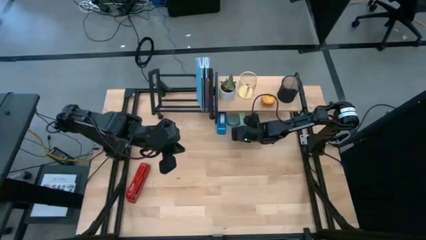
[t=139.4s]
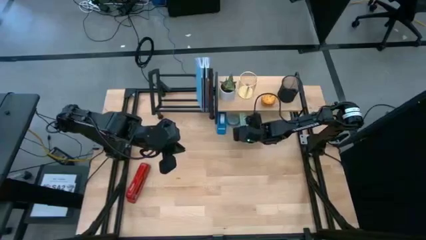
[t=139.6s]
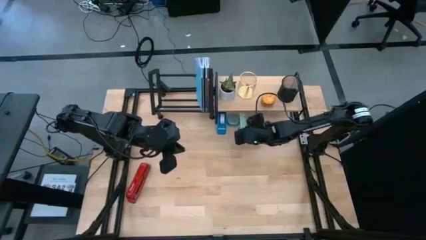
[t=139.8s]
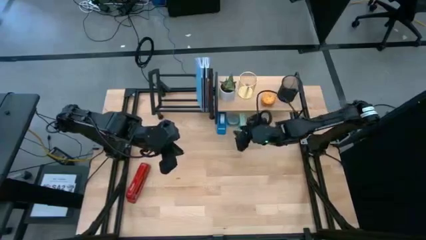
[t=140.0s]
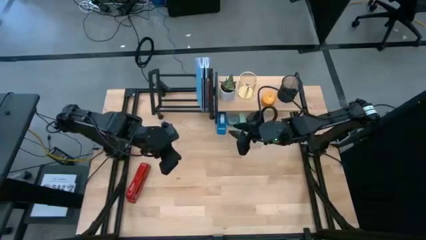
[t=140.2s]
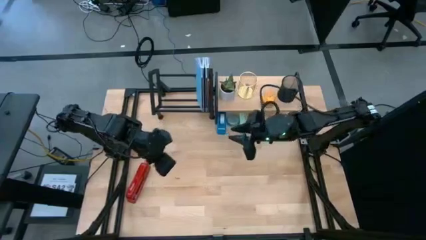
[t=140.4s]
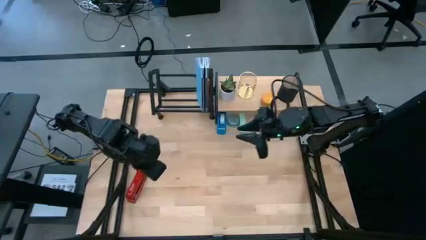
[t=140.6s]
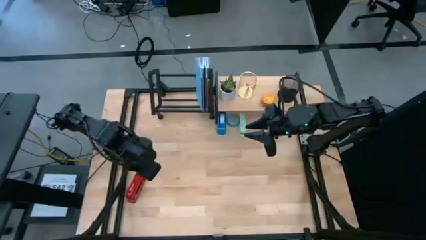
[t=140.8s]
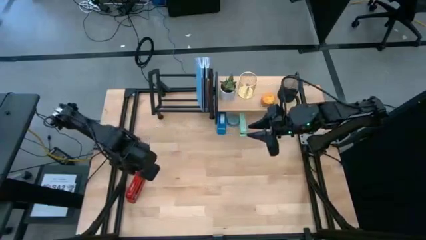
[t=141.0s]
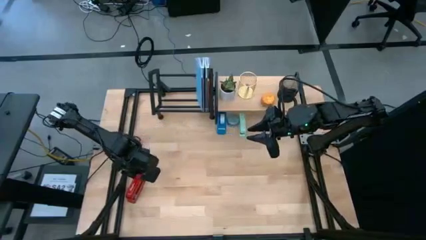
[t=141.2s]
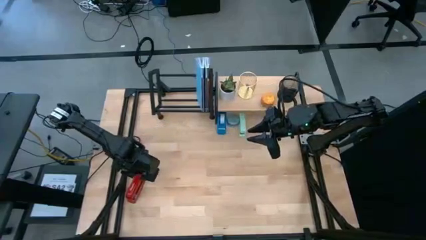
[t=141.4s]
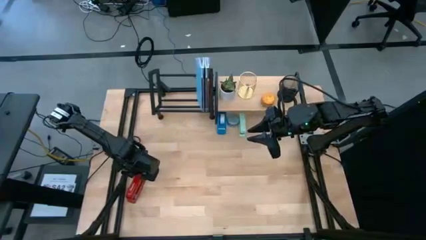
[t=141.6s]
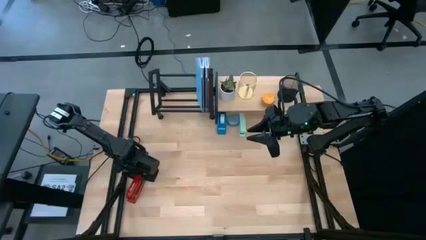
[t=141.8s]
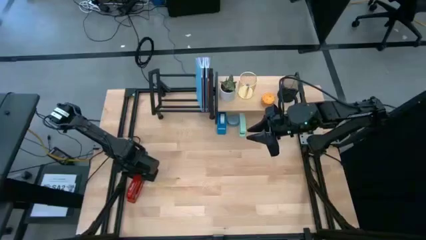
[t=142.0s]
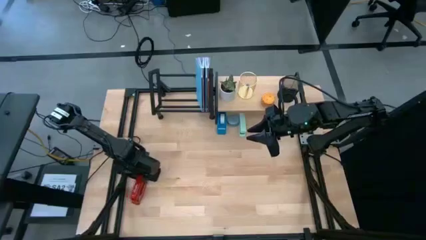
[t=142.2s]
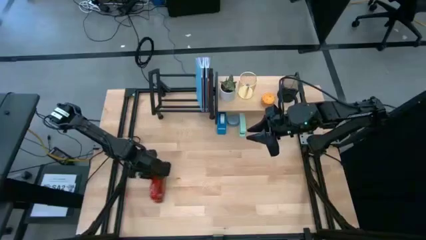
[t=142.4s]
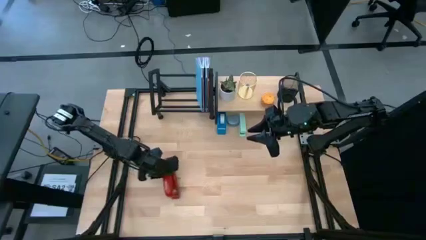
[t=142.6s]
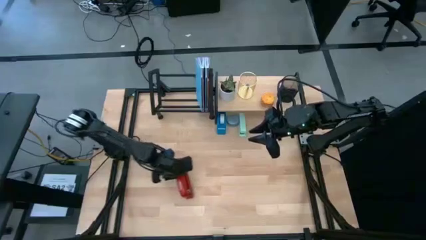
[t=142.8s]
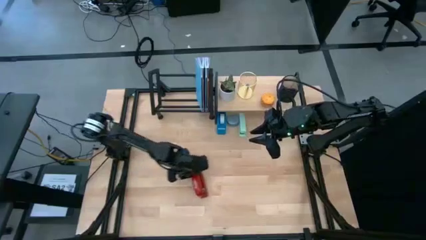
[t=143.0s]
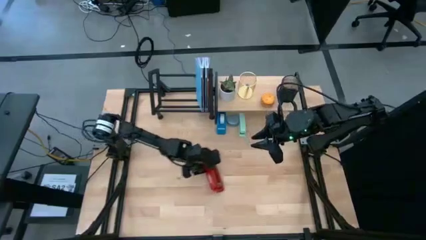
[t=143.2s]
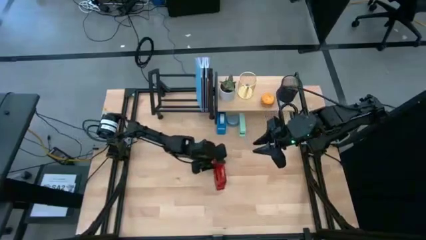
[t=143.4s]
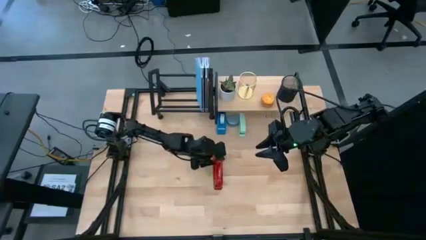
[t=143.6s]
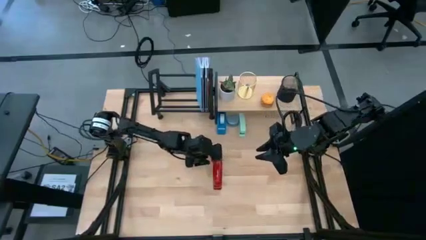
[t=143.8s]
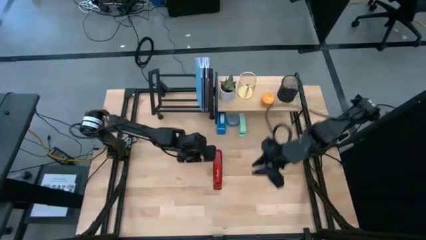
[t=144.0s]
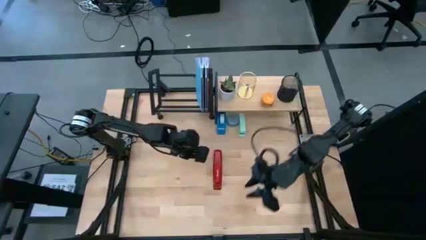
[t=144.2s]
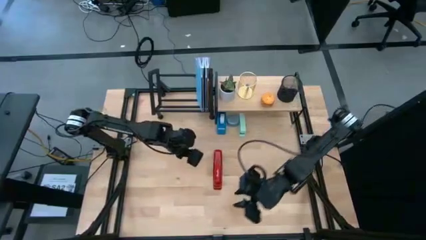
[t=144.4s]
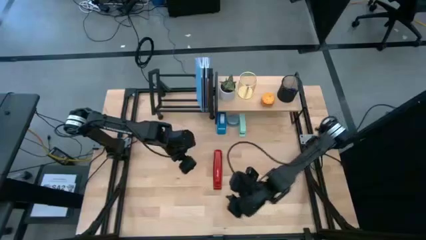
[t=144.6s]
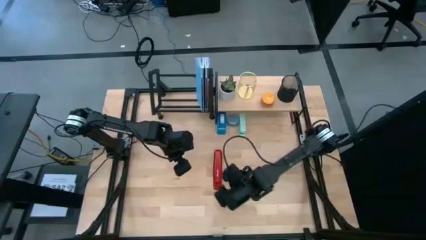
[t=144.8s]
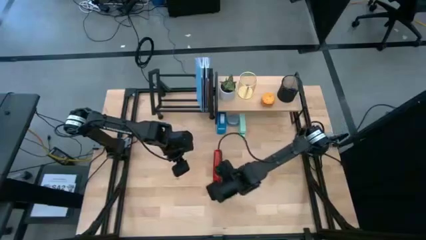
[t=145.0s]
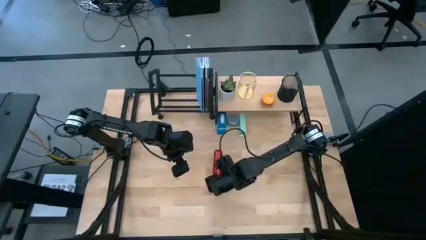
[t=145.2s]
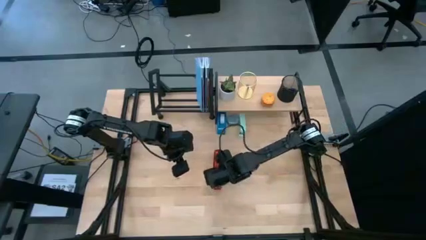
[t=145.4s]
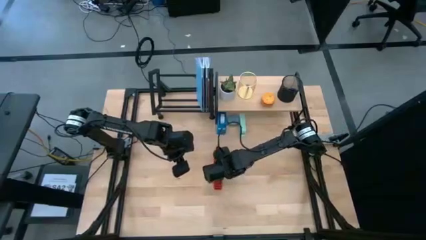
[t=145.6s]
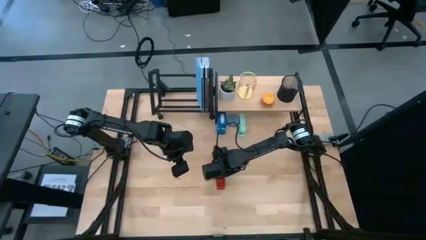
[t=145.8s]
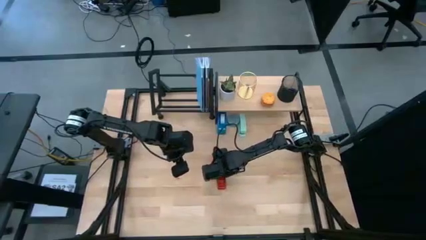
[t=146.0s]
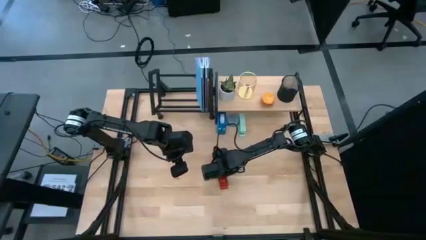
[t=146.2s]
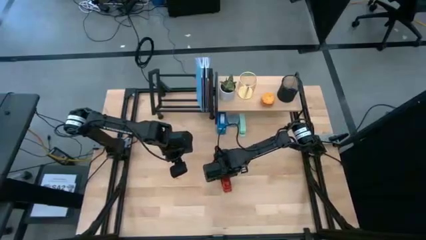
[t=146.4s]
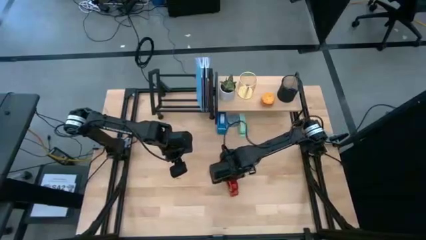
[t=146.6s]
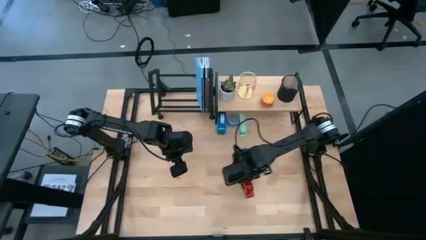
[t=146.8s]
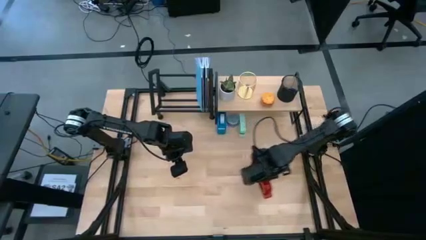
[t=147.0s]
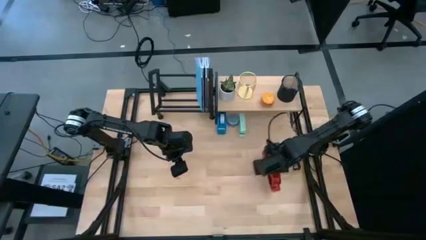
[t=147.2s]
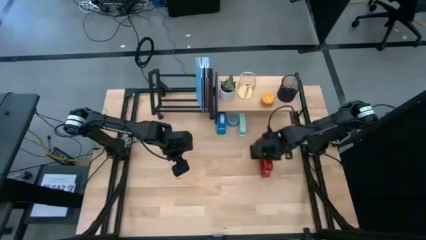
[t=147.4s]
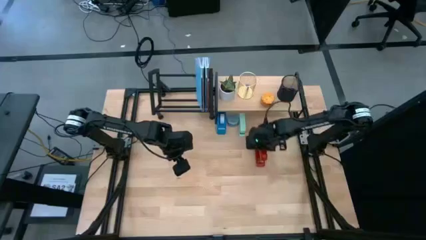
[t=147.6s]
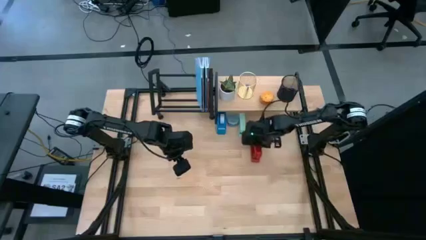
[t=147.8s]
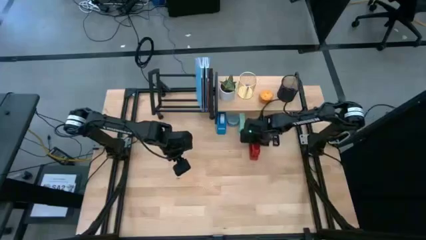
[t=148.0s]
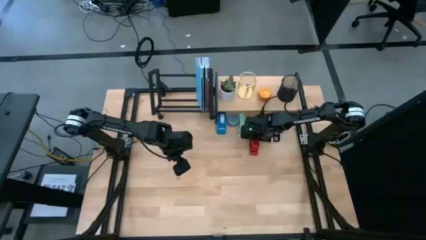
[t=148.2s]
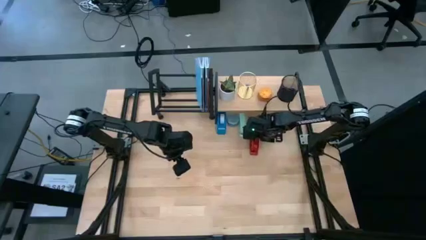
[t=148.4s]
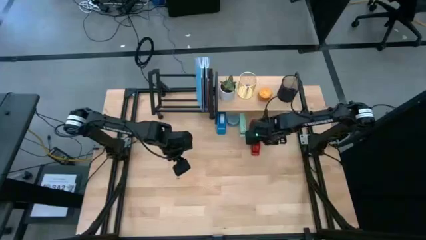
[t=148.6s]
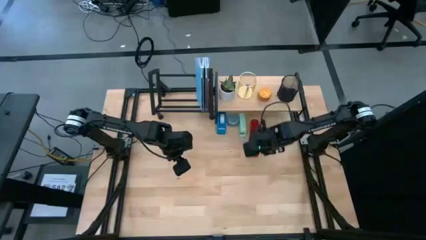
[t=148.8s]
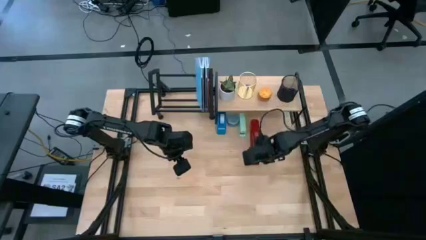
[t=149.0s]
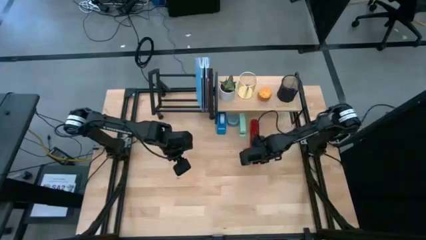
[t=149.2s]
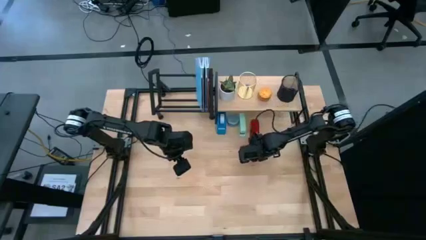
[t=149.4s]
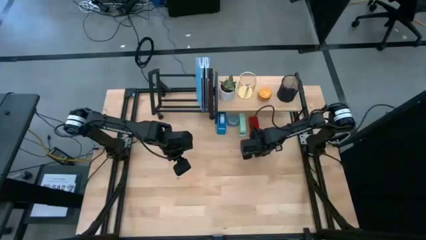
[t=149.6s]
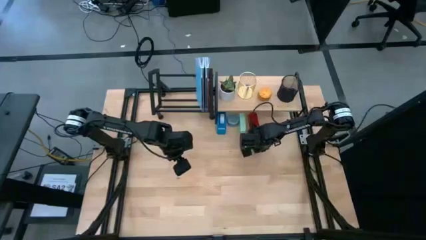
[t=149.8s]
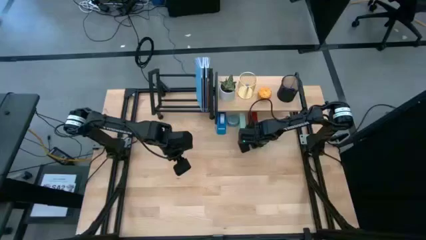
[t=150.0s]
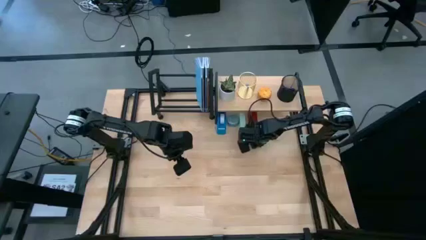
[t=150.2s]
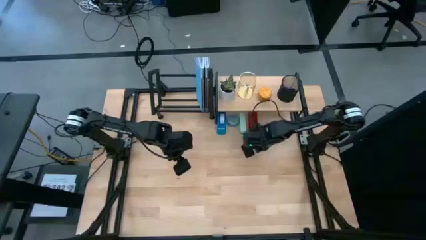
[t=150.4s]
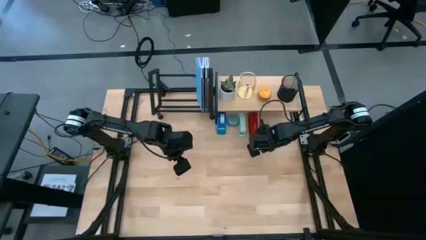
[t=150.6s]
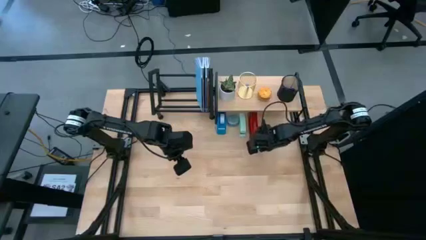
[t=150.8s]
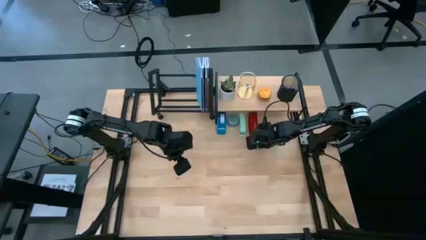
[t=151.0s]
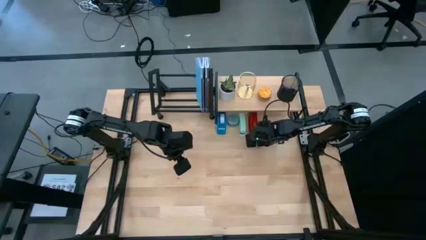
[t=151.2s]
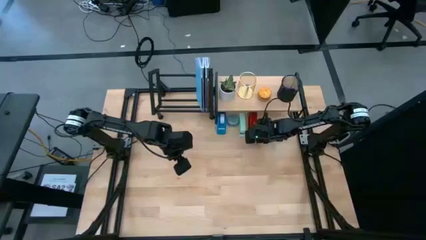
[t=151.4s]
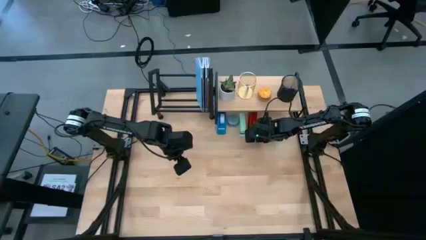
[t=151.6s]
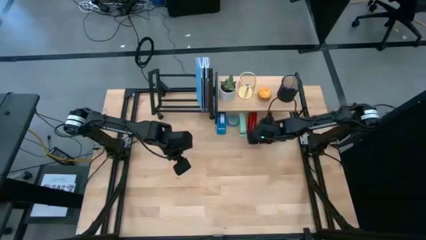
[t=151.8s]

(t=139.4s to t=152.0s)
Task: Stock shelves
Put the red stapler under the shelf

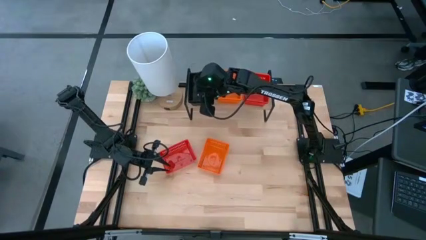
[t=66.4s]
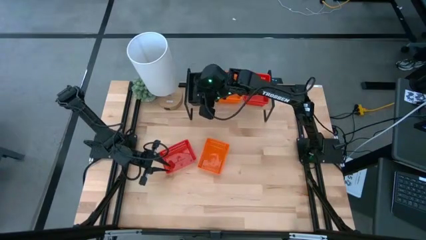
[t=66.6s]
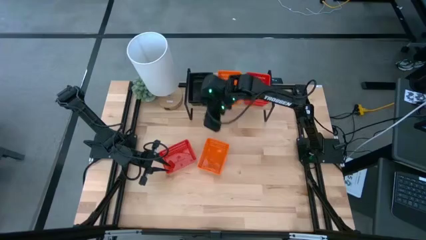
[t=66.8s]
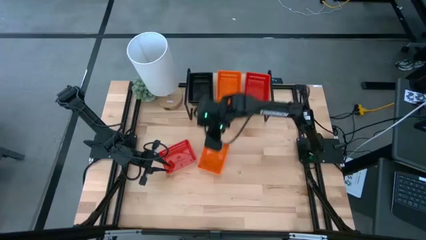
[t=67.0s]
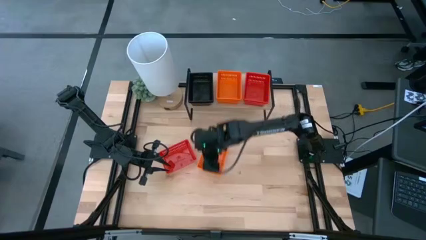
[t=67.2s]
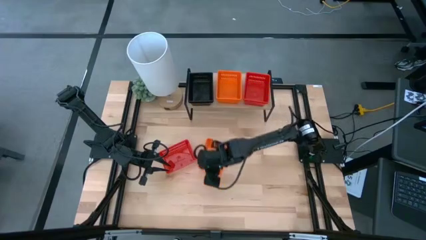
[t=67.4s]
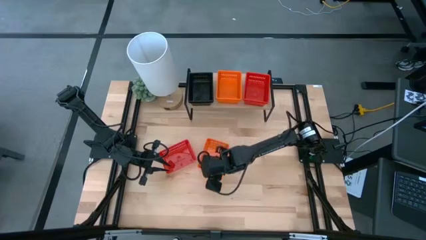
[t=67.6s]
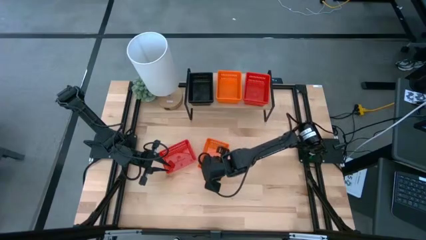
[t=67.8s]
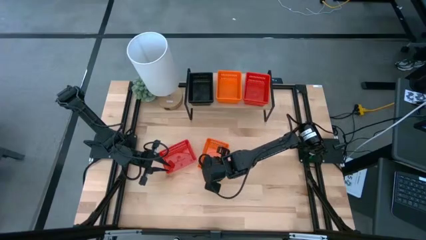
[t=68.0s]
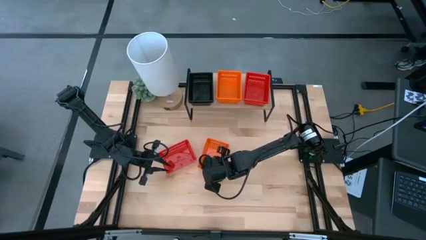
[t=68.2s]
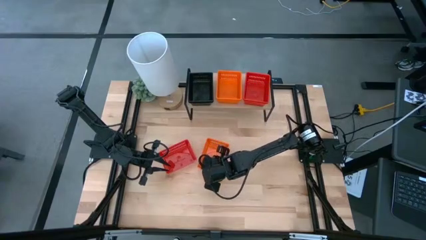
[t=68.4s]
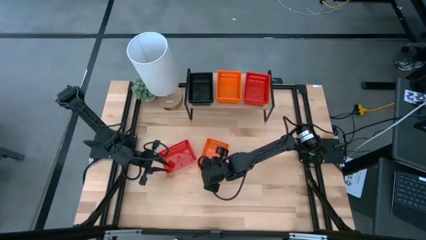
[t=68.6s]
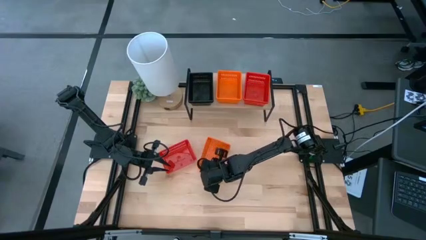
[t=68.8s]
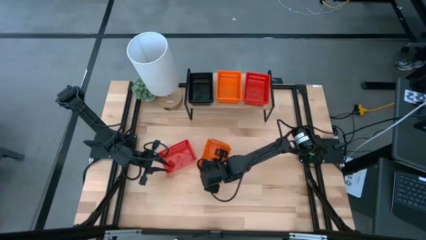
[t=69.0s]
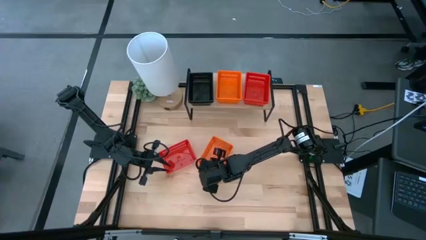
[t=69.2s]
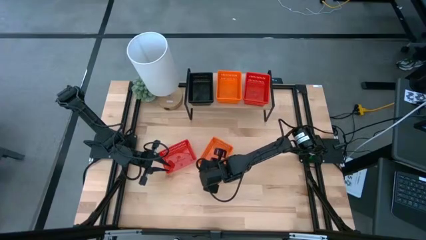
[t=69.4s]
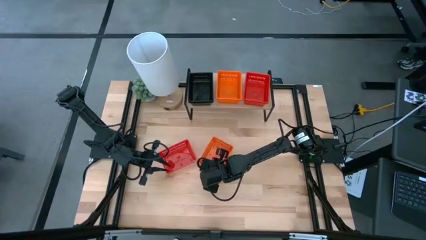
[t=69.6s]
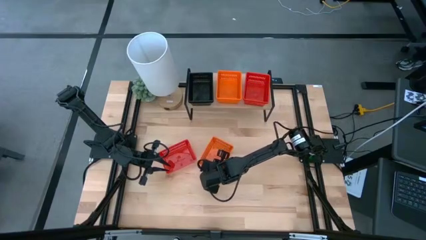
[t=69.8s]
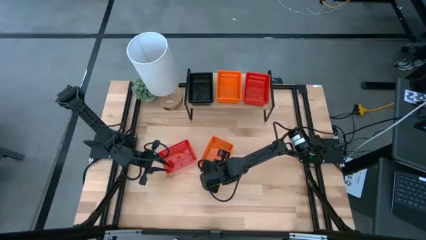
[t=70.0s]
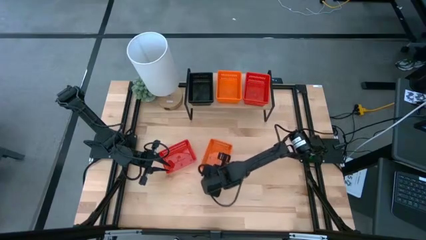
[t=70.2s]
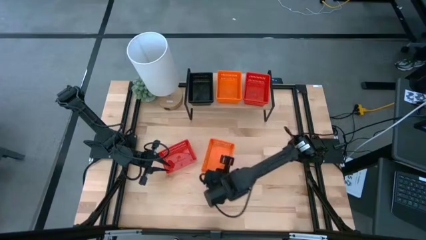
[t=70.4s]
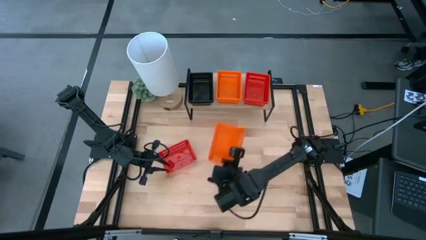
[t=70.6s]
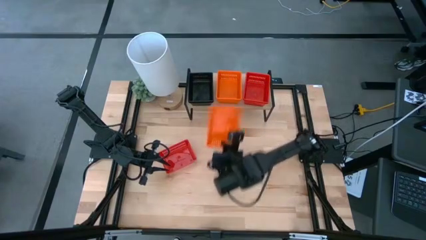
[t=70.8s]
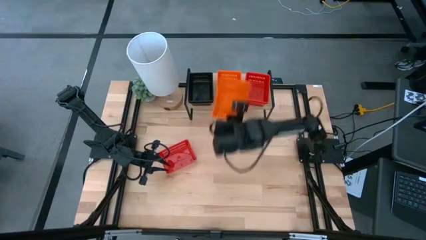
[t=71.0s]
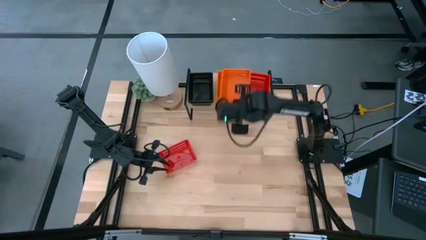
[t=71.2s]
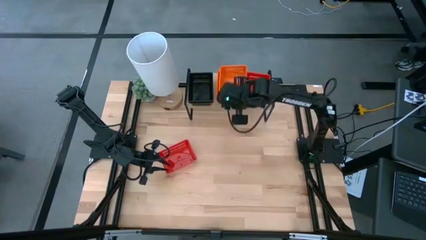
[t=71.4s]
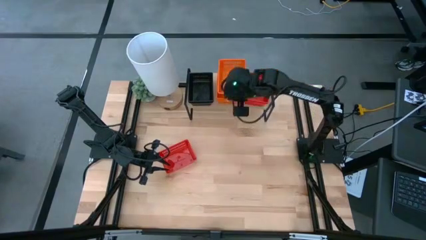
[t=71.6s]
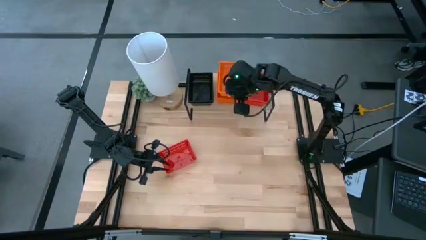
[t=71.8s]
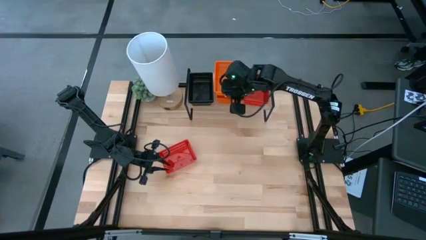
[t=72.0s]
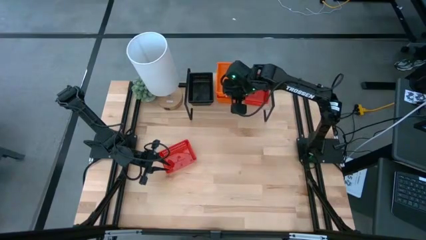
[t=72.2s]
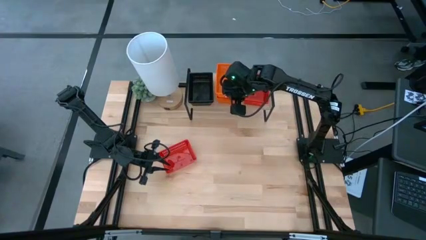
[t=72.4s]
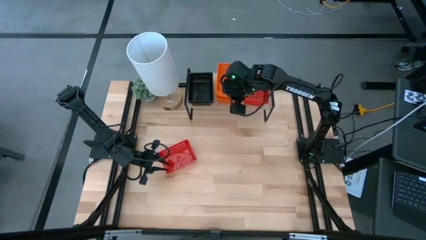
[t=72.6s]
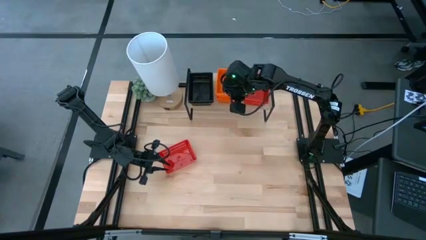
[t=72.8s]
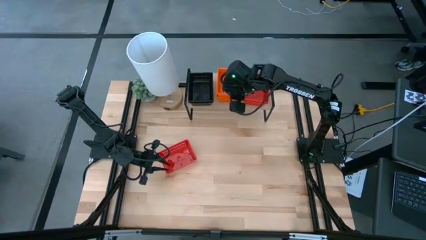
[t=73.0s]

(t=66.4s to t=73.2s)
Task: Stack baskets on shelf by color
Stack the orange bin on top of the stacked orange bins on the shelf
